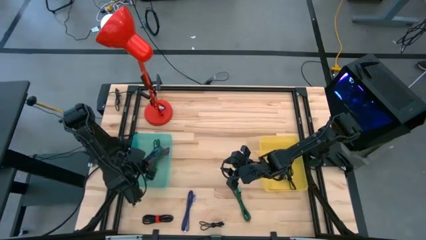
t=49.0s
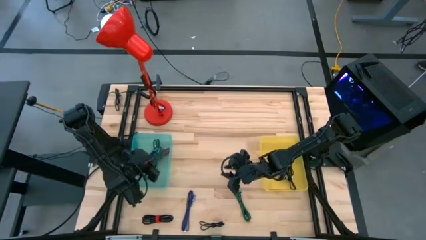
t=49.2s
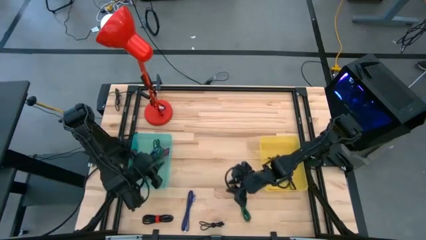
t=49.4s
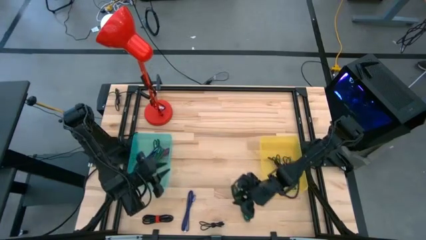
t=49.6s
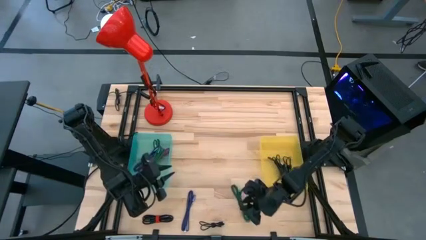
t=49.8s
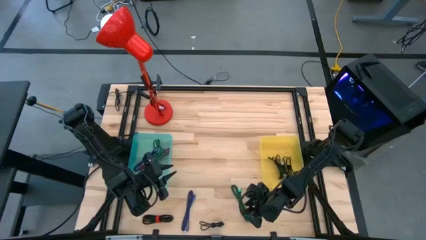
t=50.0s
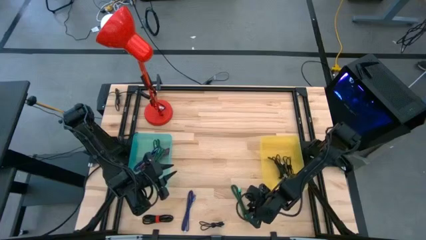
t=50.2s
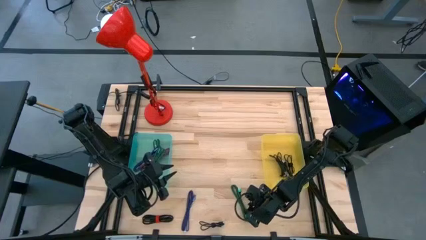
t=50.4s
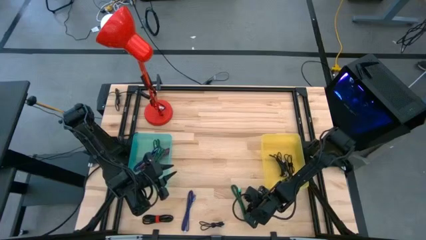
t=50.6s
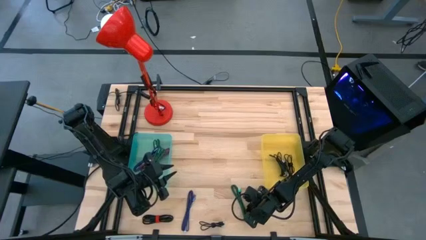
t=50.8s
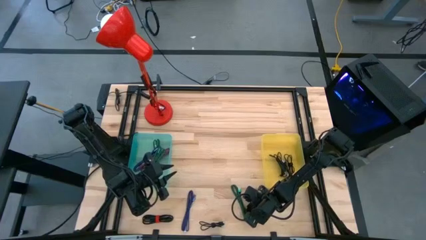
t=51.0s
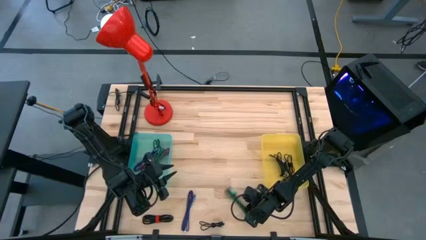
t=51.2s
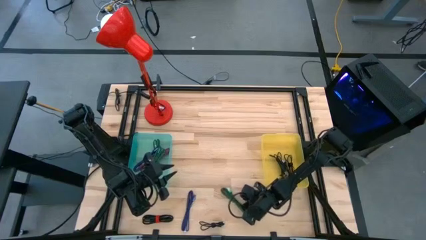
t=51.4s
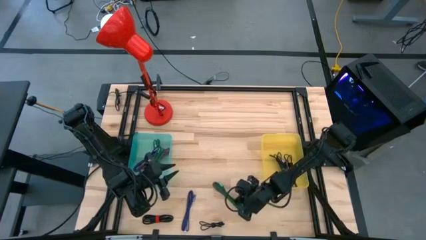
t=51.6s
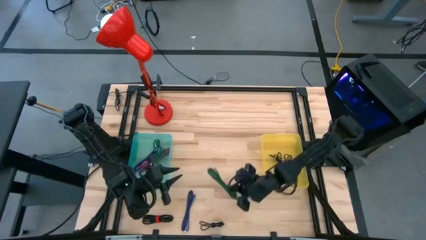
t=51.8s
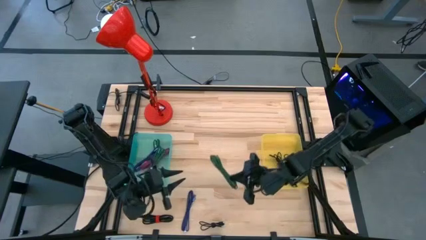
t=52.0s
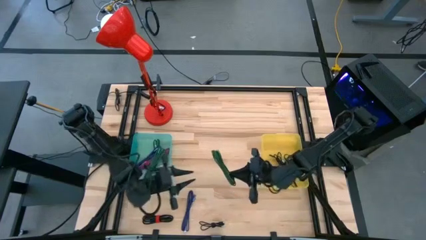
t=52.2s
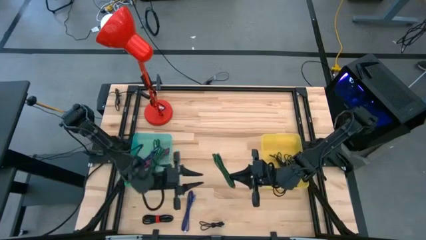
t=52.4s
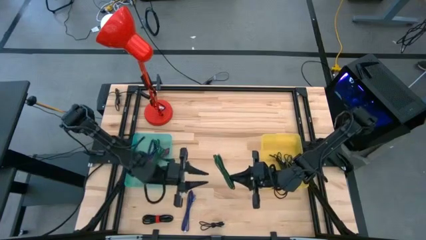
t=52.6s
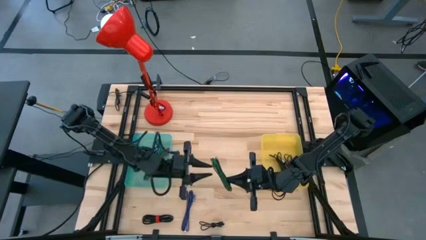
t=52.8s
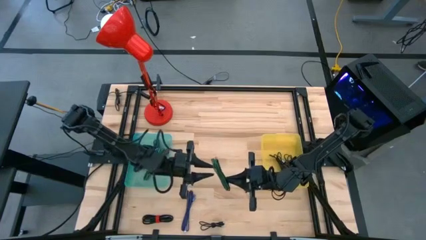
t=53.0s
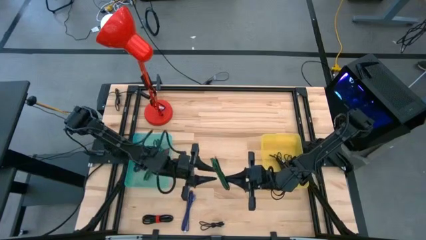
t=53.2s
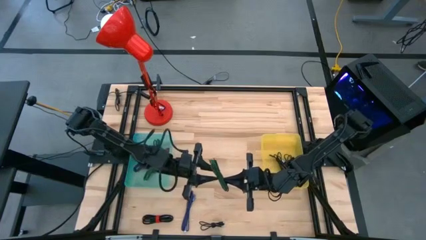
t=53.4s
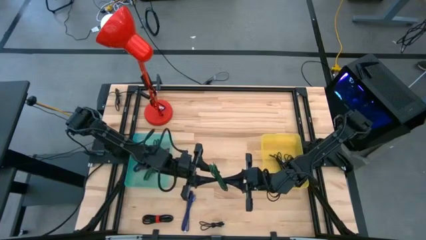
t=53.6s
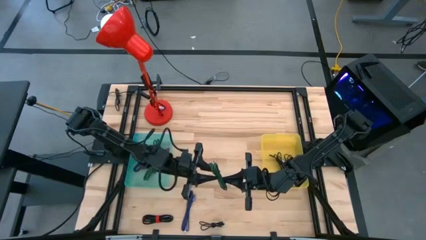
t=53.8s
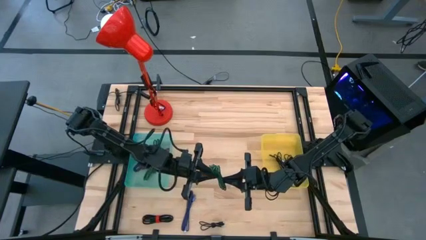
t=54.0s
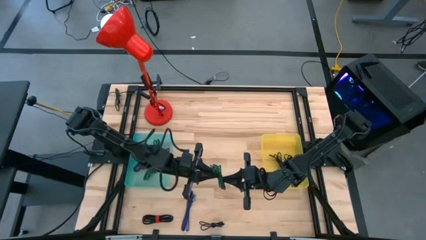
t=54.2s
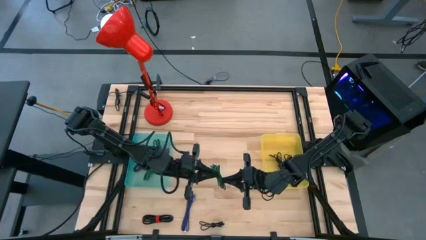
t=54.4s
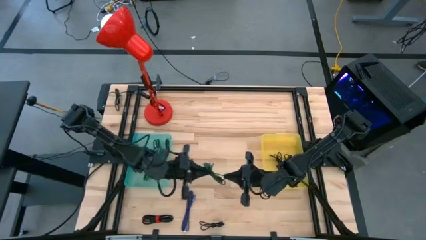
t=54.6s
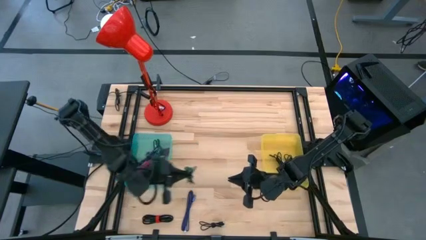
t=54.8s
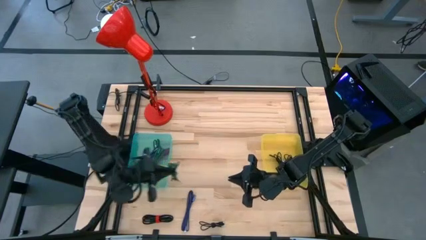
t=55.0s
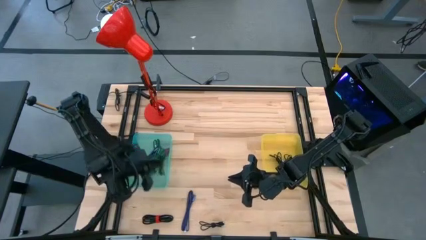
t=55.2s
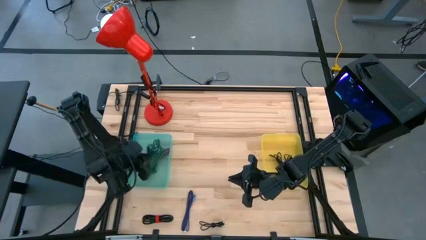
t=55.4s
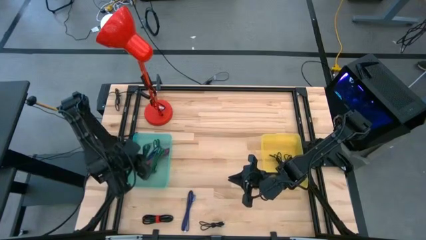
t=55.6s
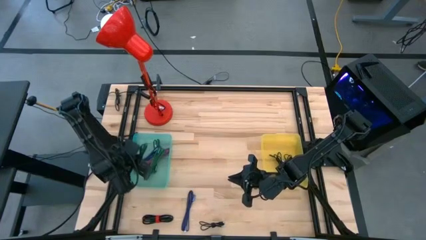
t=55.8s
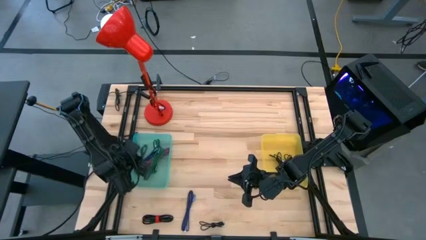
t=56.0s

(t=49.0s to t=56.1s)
Task: Pick & Place USB Port
Put the green charger cable into the green bin

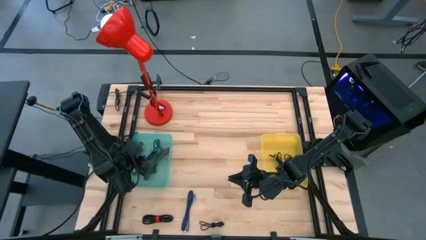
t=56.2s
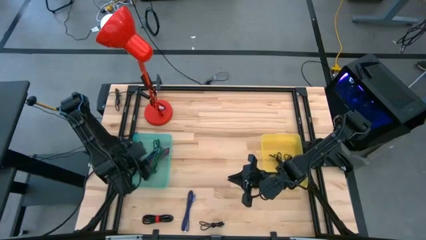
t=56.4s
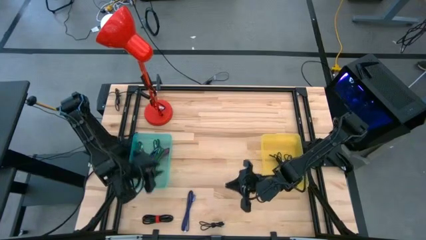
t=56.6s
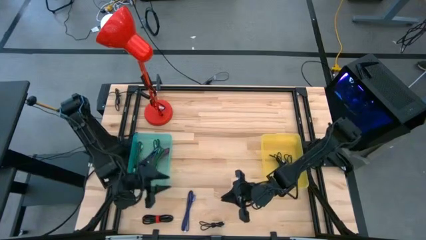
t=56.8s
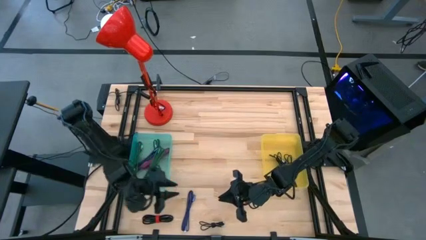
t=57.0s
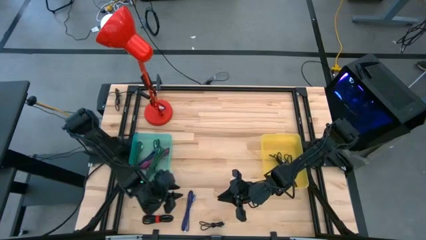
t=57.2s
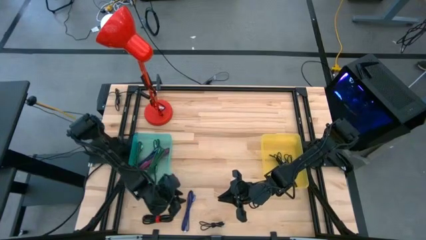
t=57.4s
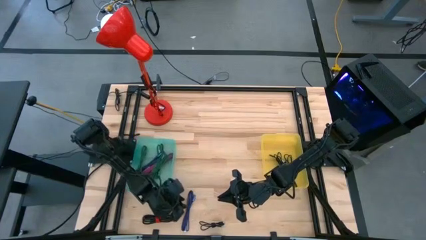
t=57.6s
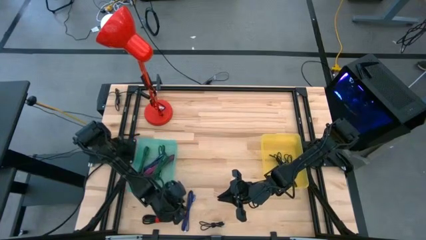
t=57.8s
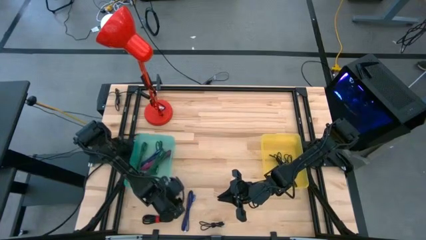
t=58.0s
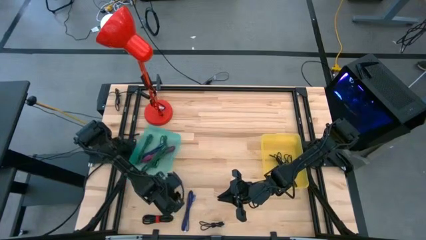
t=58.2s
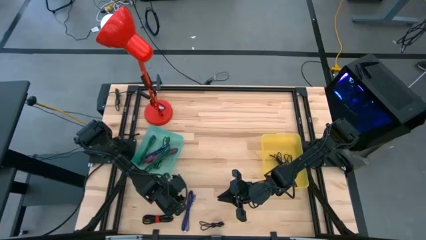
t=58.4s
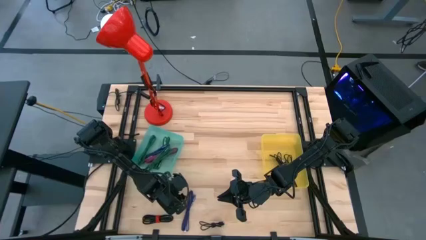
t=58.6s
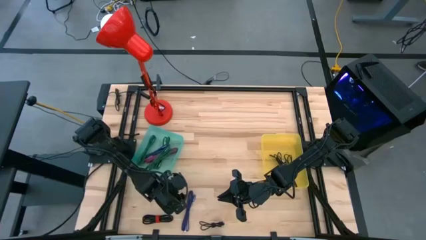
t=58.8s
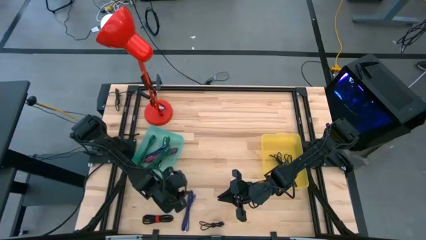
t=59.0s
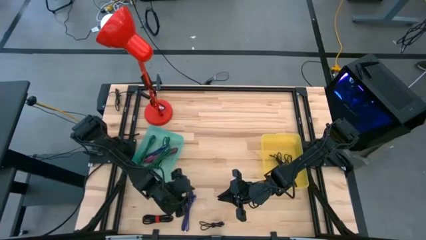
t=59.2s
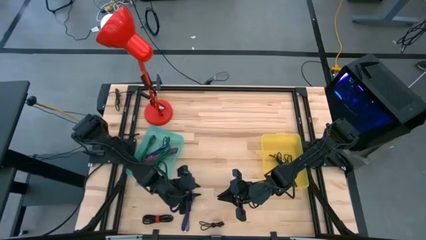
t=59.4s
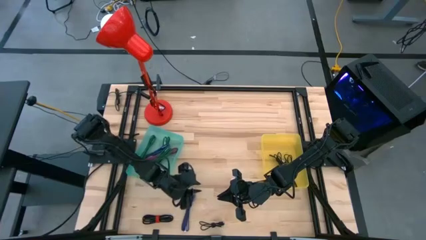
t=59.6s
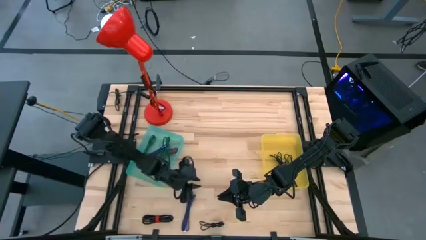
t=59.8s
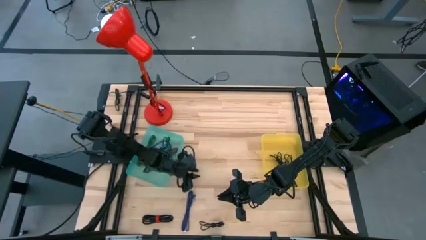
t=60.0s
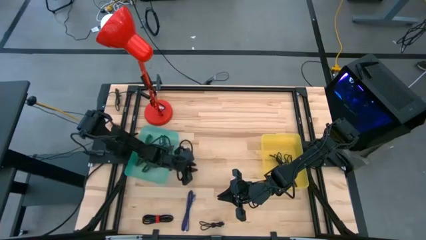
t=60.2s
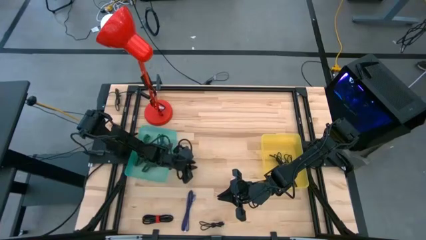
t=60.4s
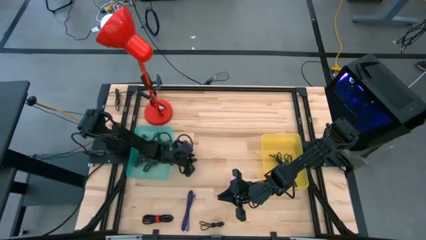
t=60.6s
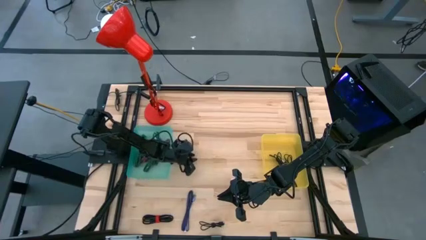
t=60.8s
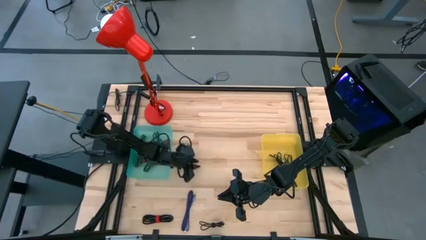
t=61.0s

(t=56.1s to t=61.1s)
Adjust the green bin

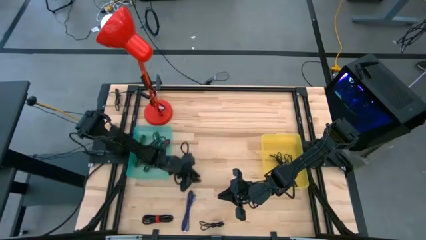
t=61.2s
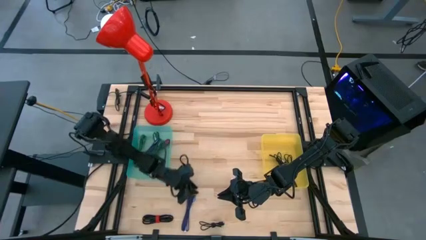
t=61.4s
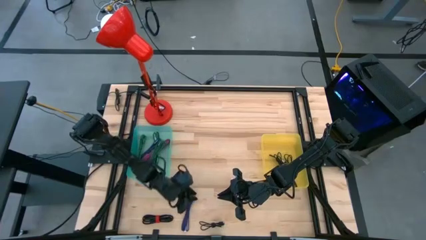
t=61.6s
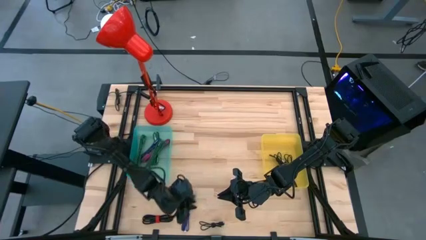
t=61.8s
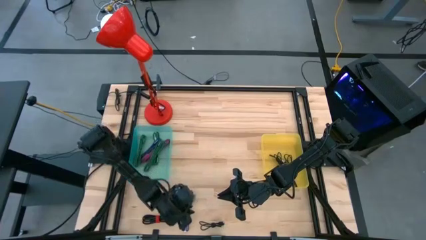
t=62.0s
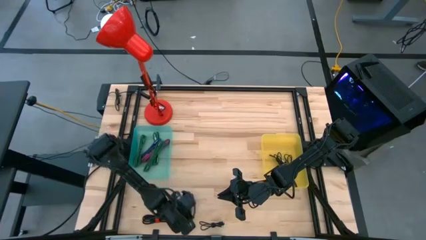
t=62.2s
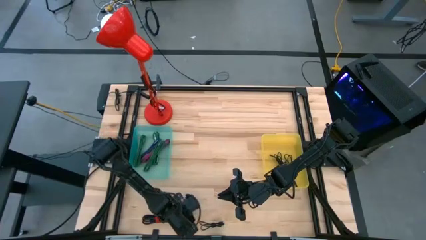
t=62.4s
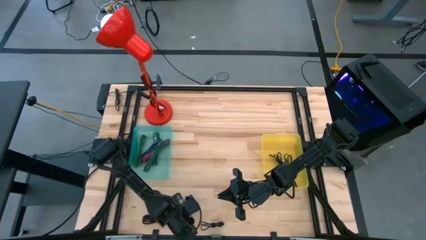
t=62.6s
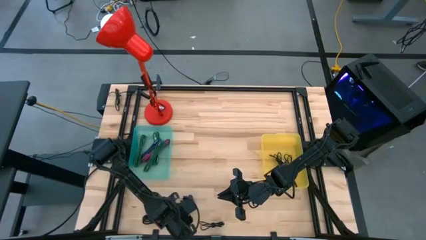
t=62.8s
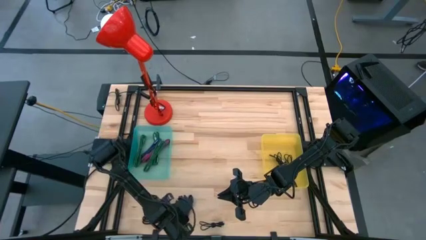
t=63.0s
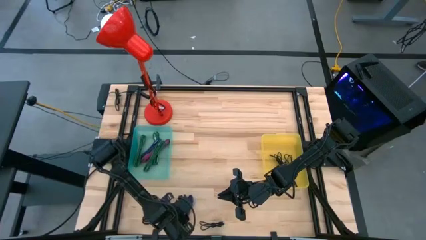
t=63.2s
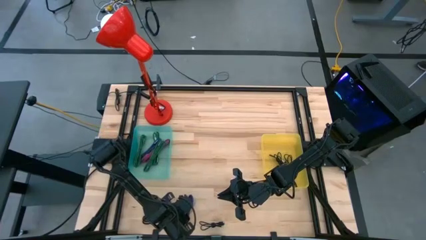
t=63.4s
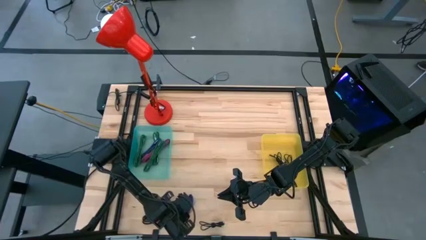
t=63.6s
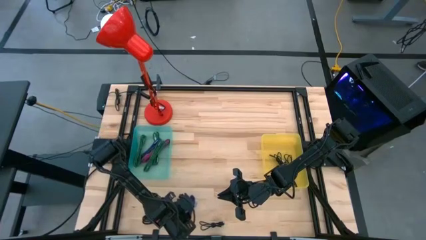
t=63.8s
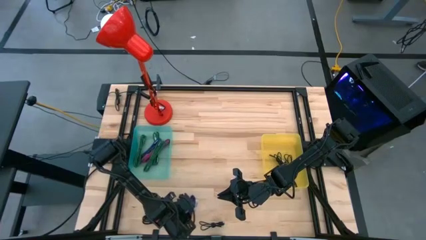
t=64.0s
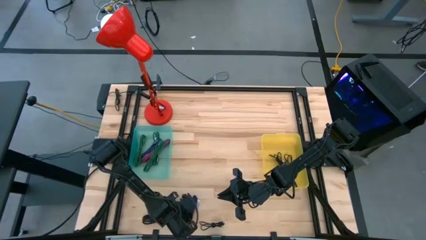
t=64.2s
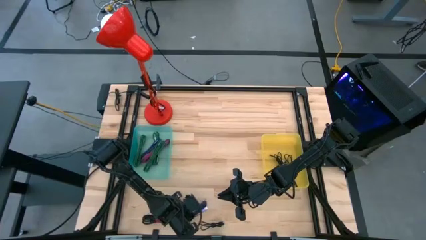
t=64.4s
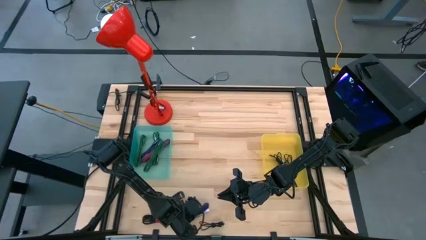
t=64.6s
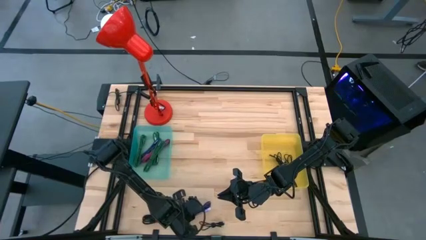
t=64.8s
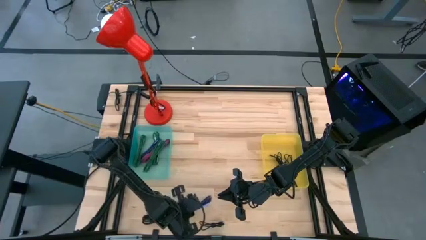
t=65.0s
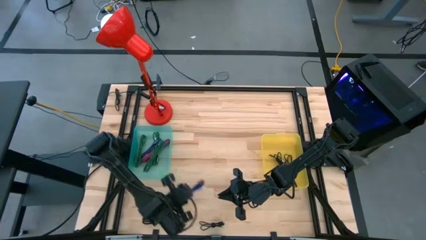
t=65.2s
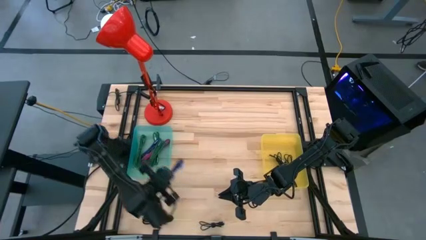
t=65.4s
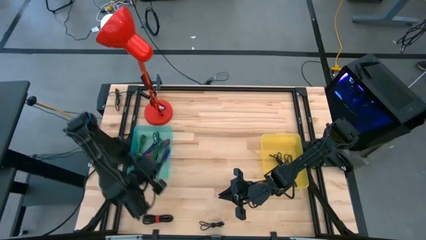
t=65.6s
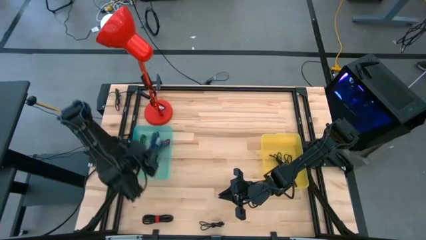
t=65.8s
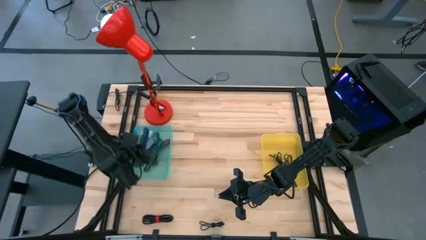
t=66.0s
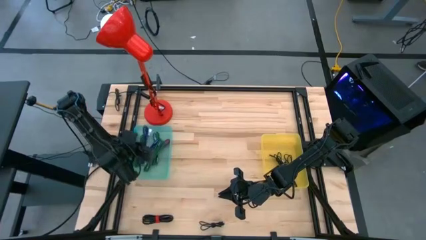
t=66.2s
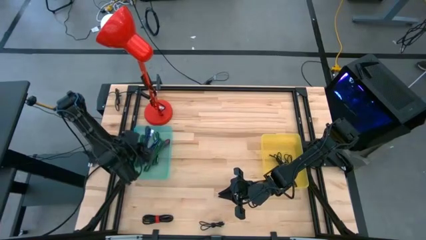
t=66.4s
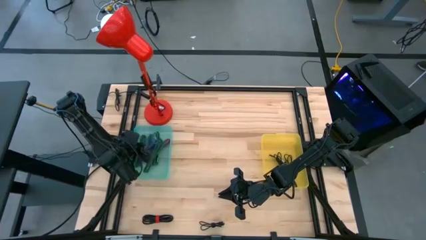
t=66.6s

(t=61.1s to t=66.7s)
Put the blue charger cable into the green bin
